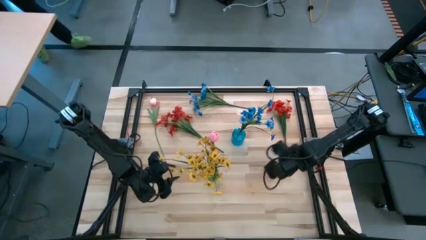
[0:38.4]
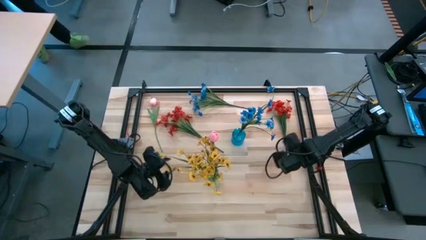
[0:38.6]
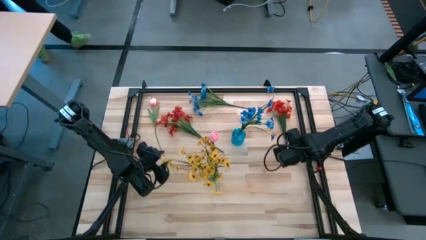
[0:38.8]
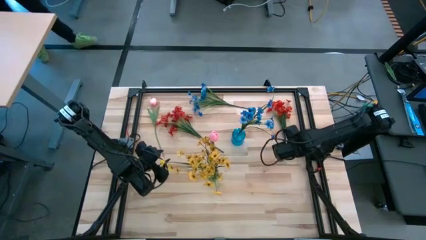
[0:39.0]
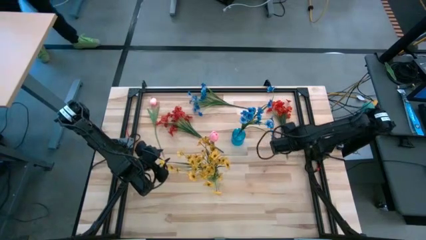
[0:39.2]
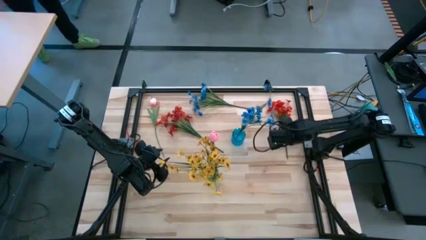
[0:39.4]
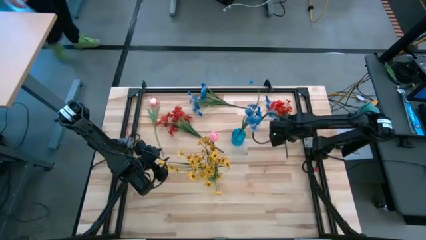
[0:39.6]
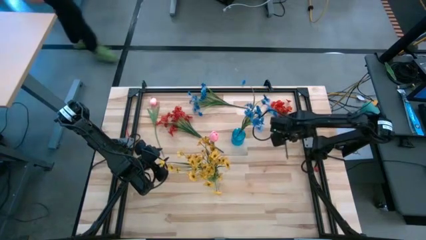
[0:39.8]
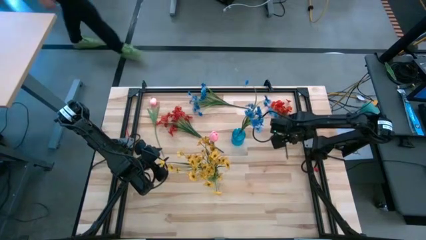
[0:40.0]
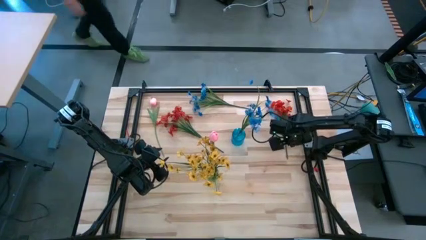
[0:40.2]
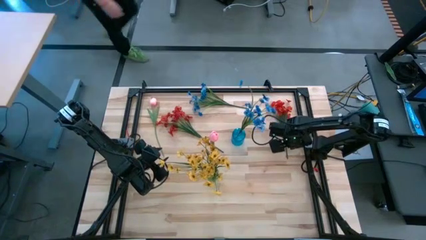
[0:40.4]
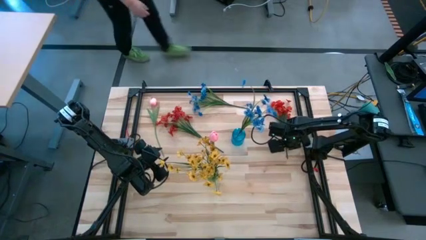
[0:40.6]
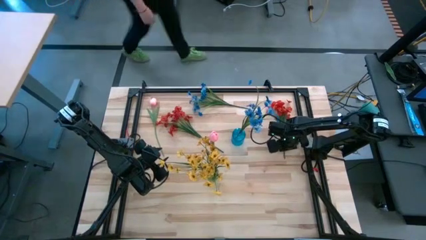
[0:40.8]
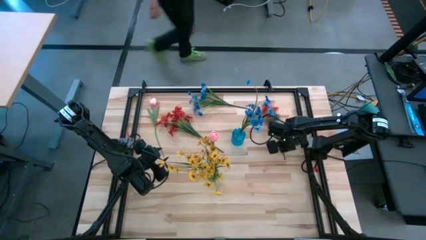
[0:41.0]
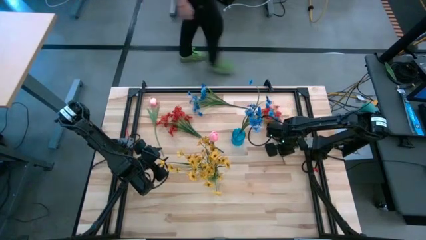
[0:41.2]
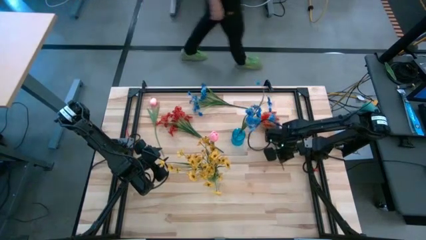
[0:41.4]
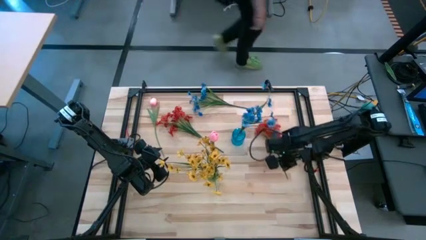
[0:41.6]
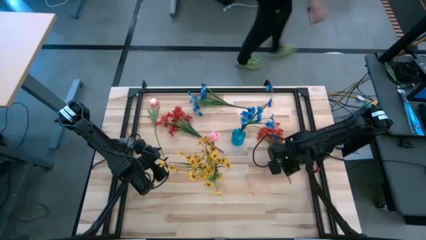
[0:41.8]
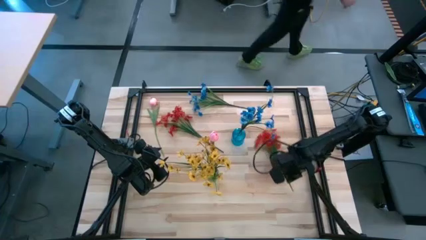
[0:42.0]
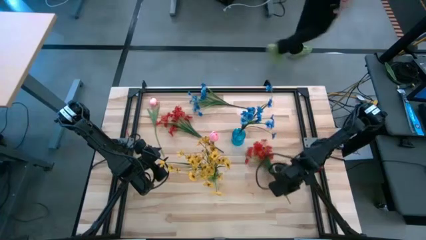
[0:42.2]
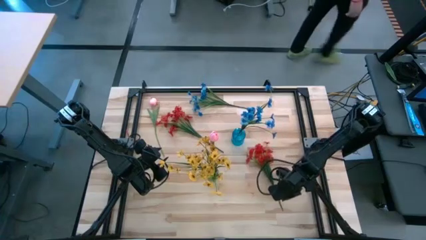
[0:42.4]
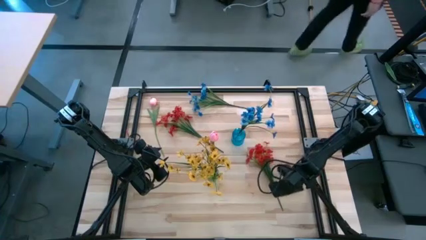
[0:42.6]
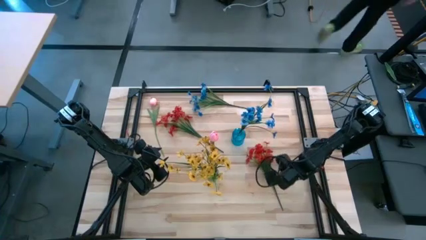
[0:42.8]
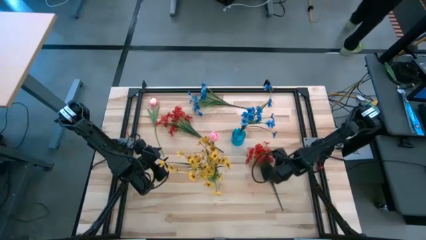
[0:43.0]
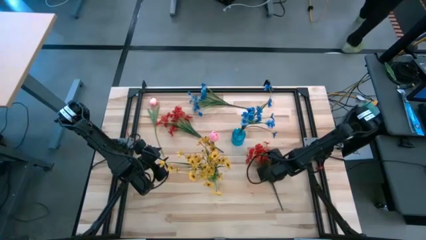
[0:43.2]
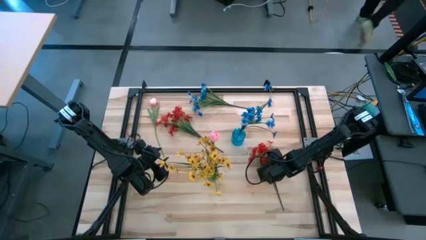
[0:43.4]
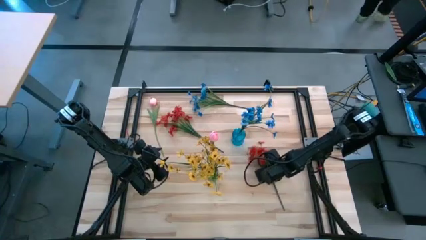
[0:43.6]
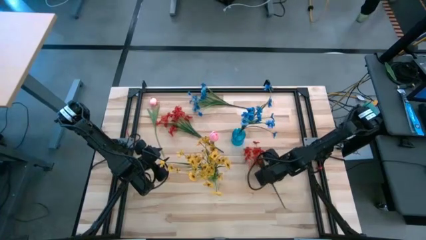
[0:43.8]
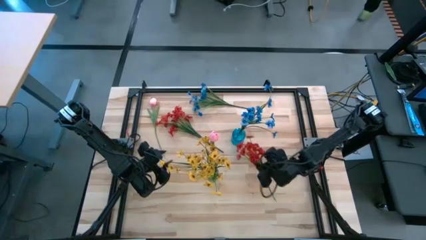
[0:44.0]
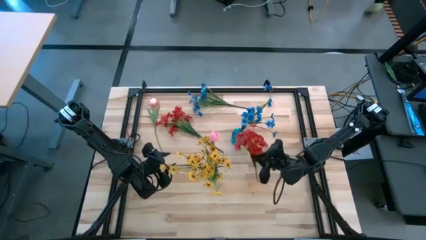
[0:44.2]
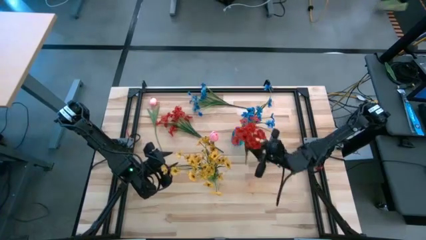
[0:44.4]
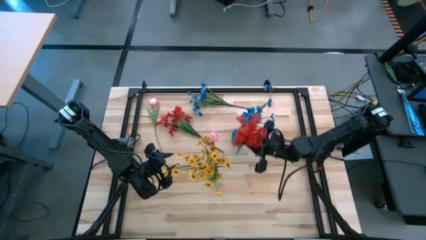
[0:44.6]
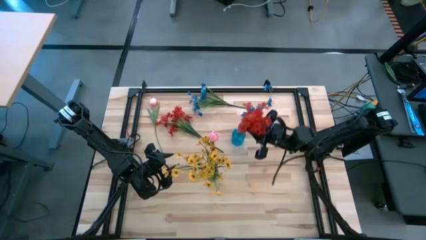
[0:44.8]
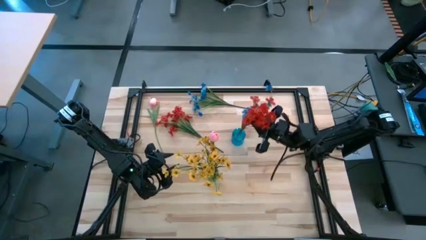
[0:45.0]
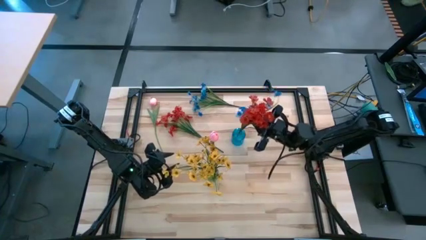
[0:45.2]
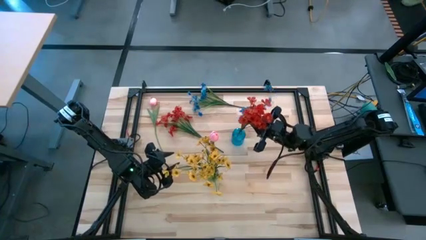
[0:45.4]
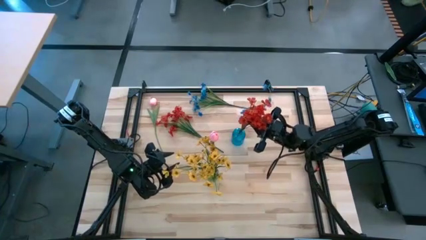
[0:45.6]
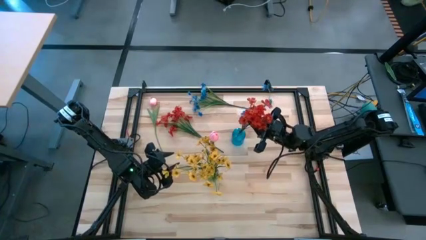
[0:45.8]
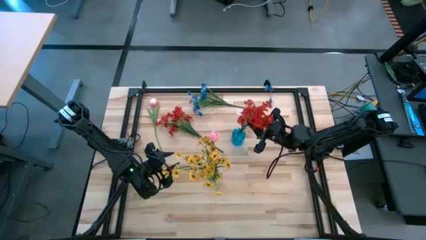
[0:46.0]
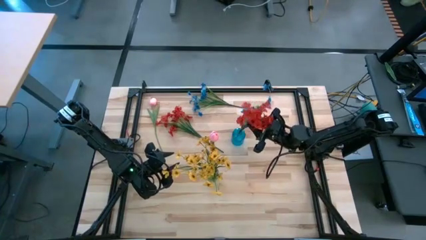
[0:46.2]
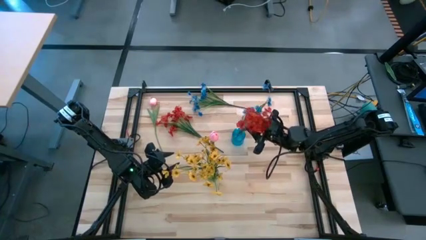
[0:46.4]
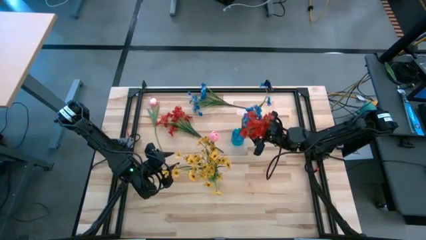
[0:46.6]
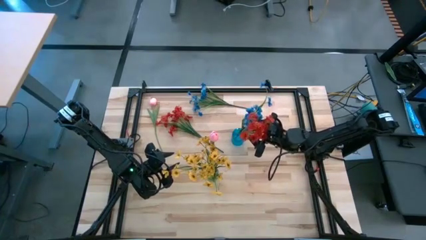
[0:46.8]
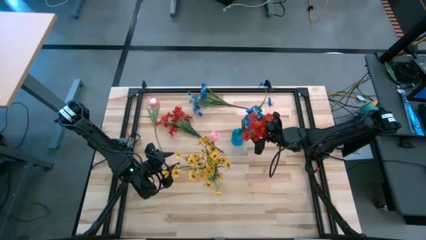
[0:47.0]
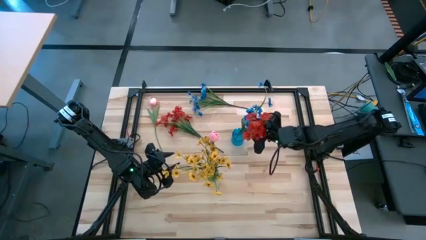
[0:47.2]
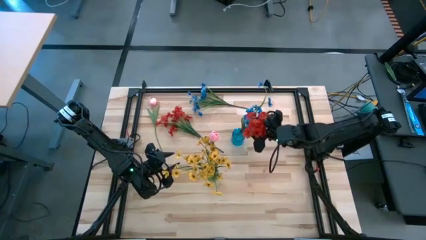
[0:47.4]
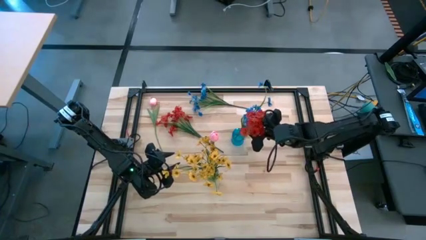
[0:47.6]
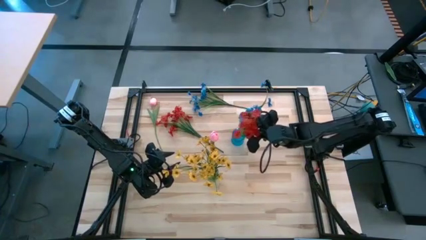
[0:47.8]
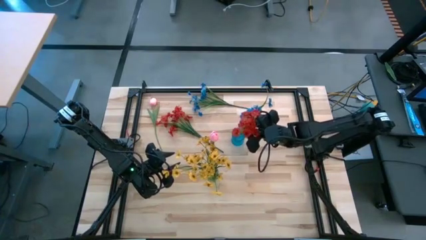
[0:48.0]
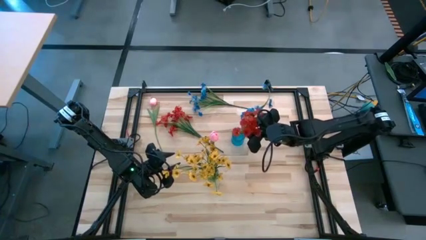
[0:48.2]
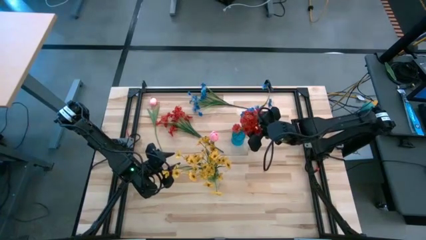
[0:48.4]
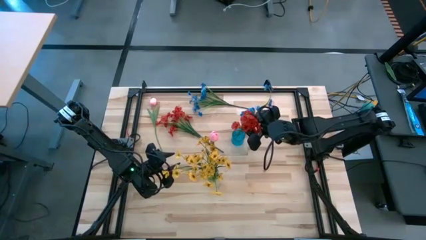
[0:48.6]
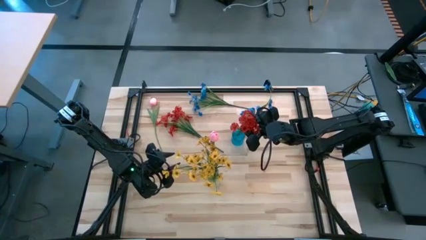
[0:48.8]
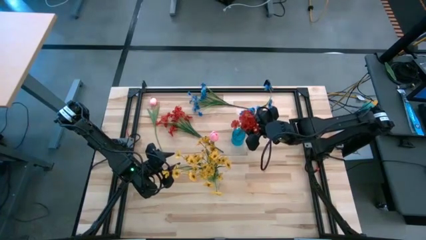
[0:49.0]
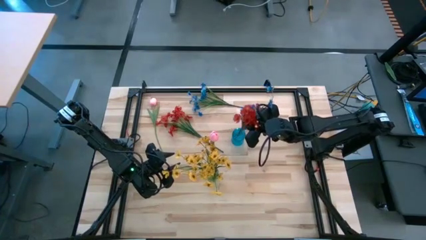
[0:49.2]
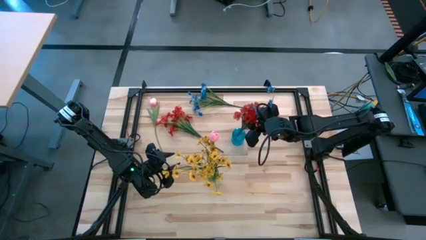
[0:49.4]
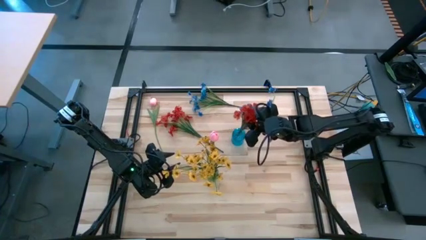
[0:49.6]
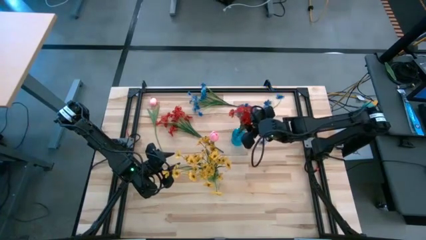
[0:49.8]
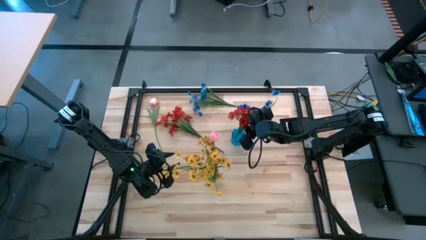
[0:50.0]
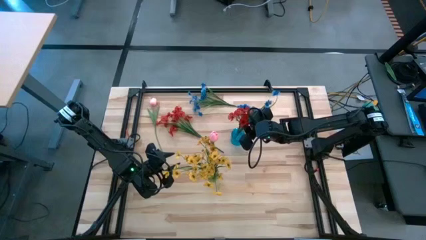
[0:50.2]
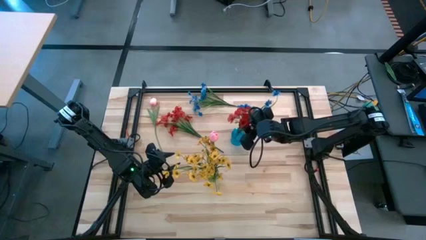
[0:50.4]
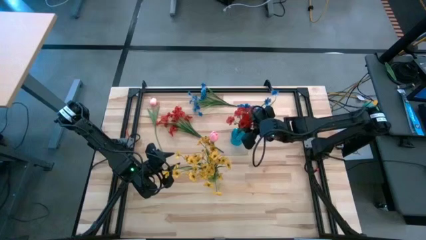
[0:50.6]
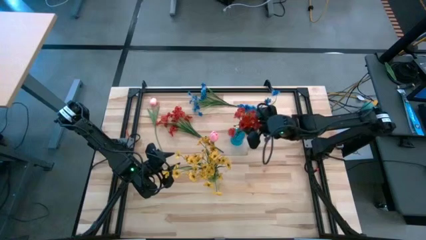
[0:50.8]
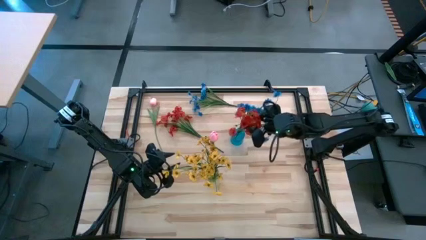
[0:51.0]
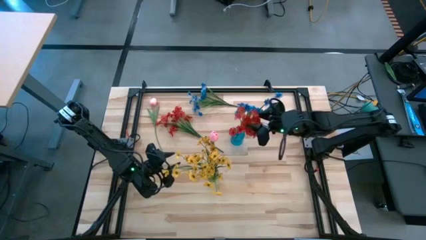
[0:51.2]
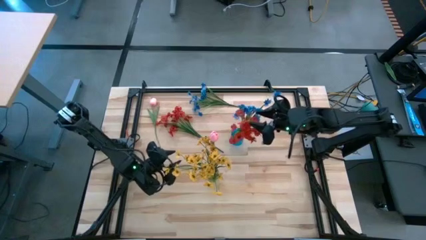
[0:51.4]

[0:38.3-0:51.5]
Task: Sort flowers into vase by color
Put the right red flowers into the blue flower vase

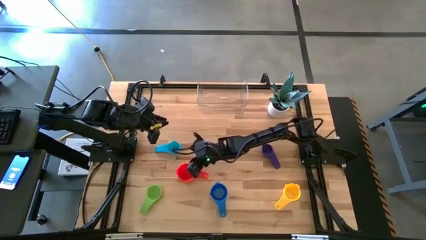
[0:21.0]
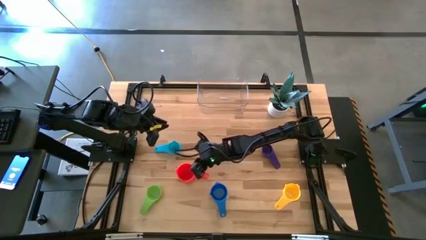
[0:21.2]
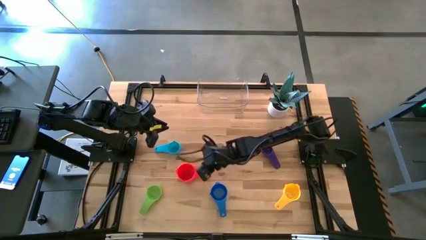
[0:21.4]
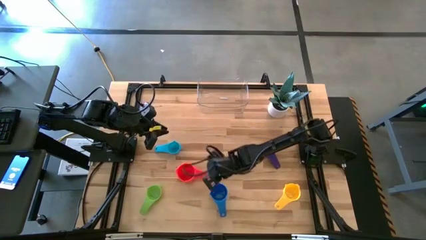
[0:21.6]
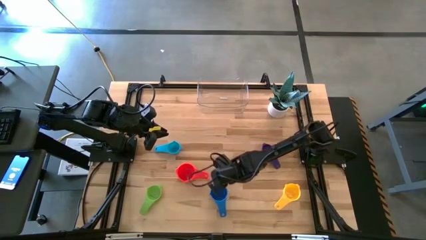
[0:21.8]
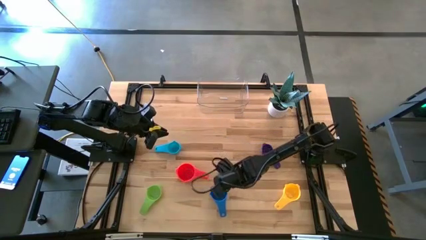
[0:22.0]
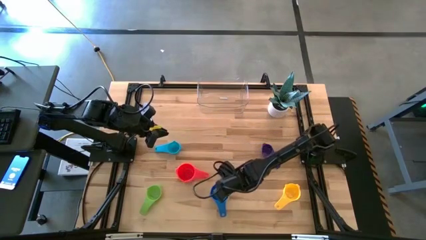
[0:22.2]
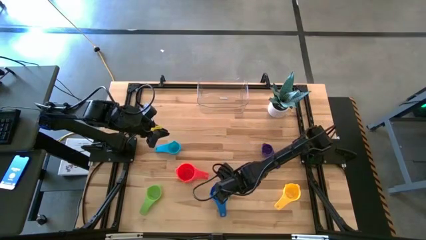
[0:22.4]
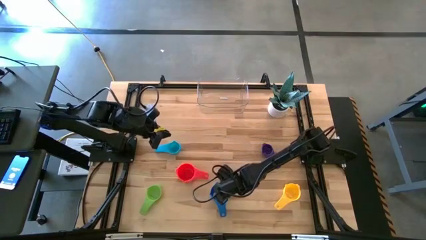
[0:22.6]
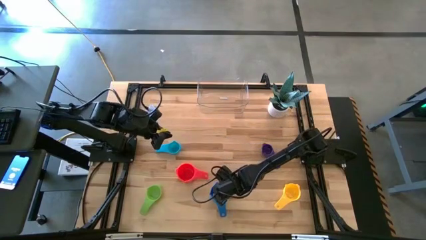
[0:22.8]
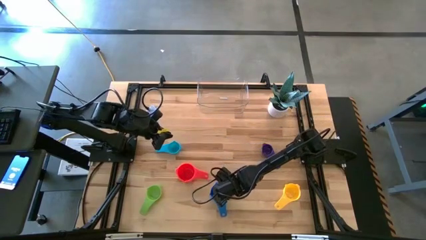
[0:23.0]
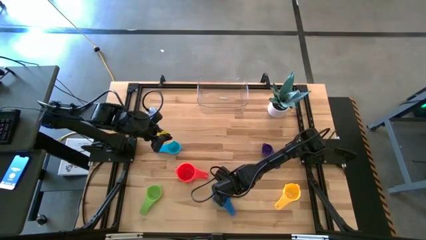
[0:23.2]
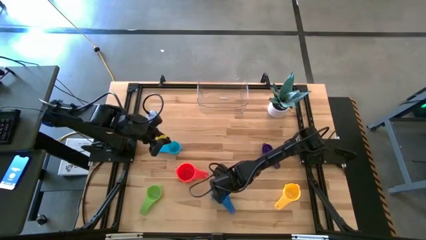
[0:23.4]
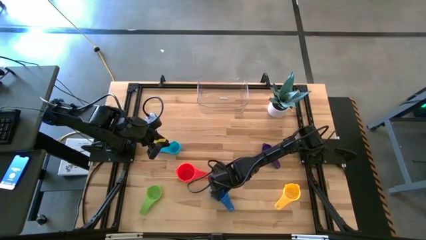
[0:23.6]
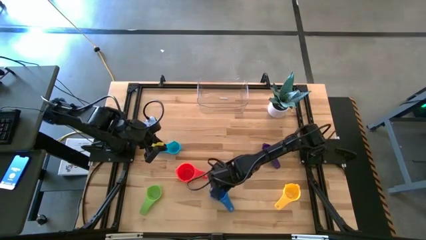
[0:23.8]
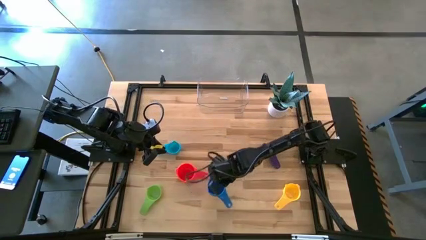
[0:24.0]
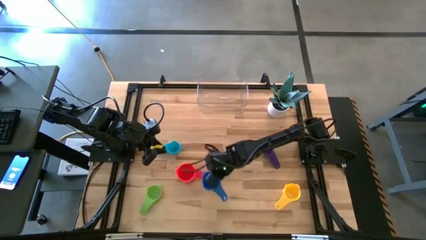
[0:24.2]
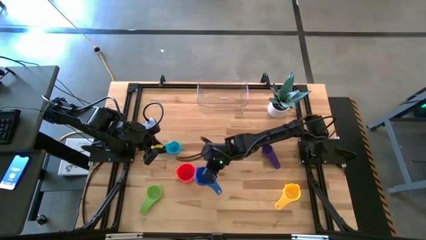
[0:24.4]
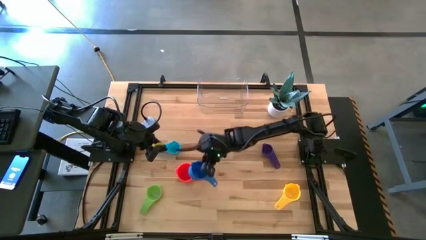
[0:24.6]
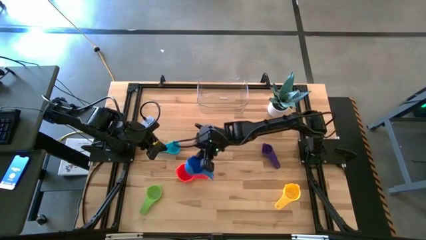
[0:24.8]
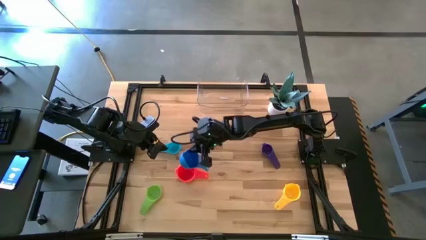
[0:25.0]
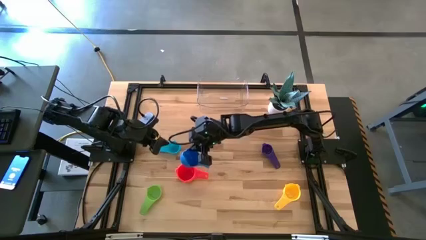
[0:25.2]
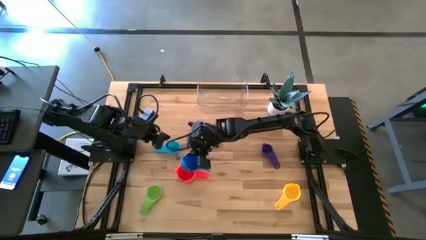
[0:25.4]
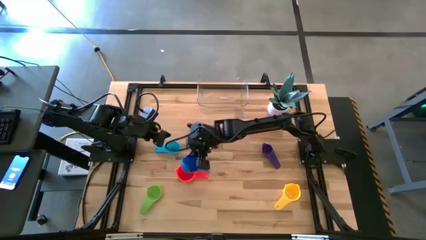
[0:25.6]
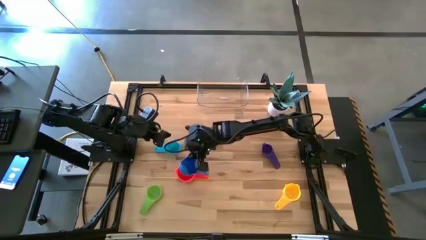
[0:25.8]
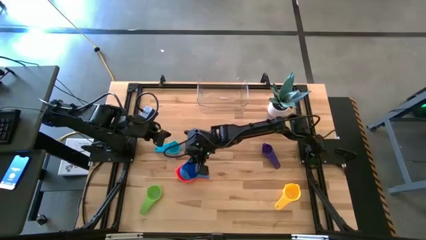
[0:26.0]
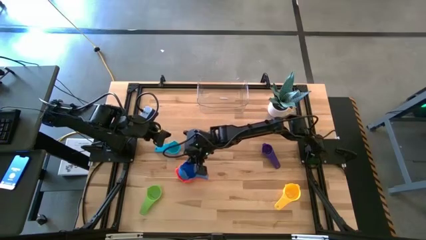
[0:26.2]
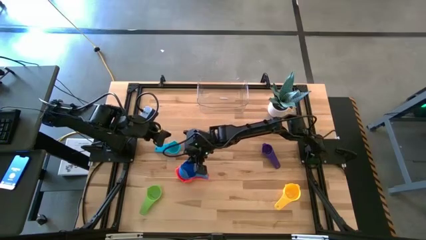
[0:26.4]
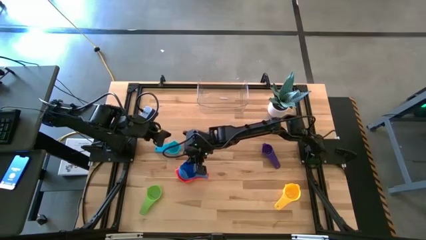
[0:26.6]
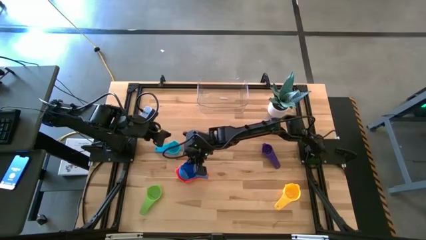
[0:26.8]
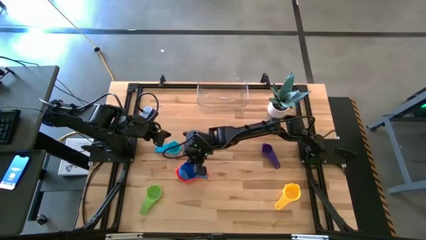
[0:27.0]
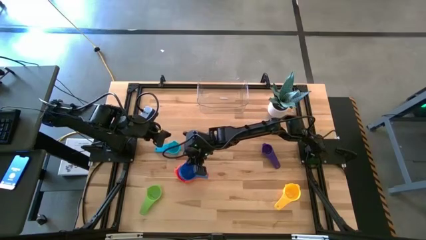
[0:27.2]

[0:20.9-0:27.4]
Task: Nest measuring cups in basket
Stack the blue measuring cup on top of the red measuring cup
